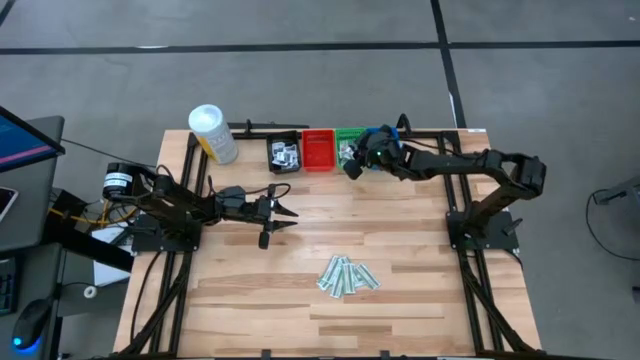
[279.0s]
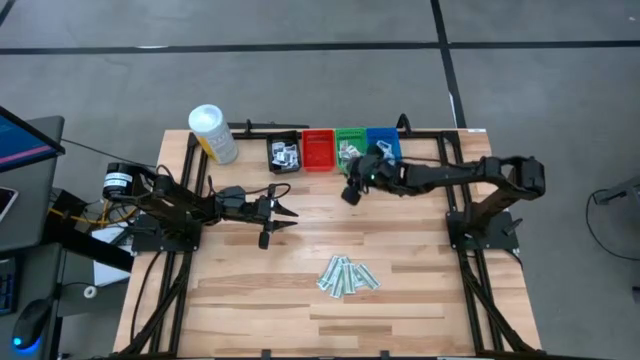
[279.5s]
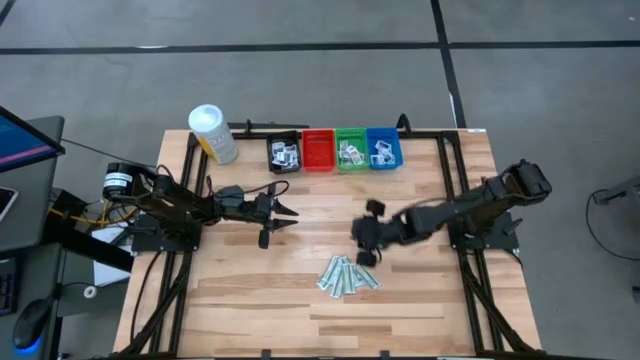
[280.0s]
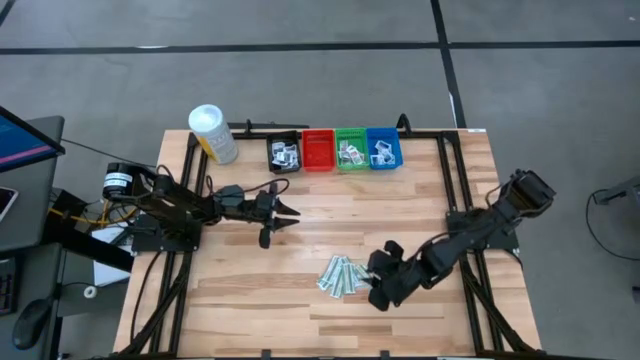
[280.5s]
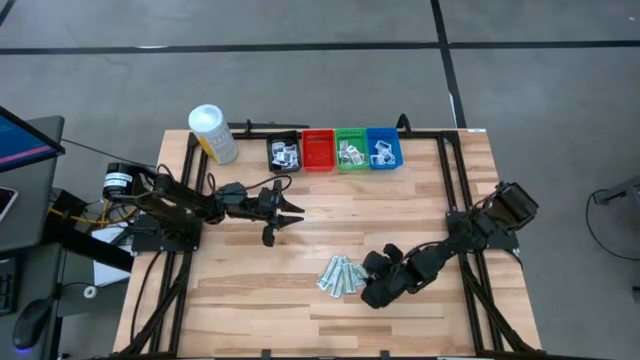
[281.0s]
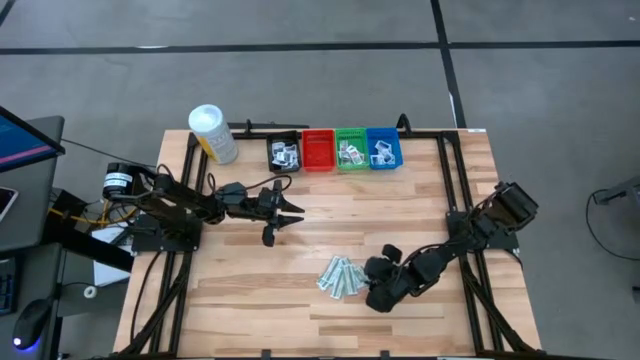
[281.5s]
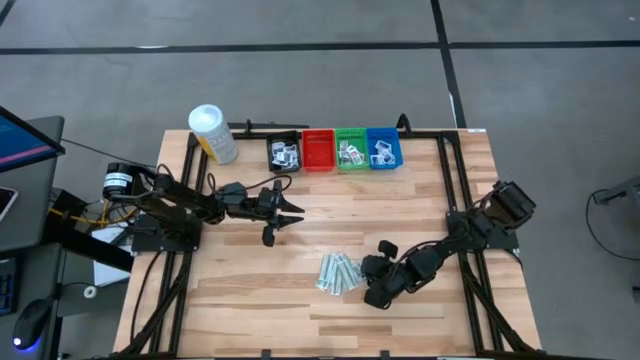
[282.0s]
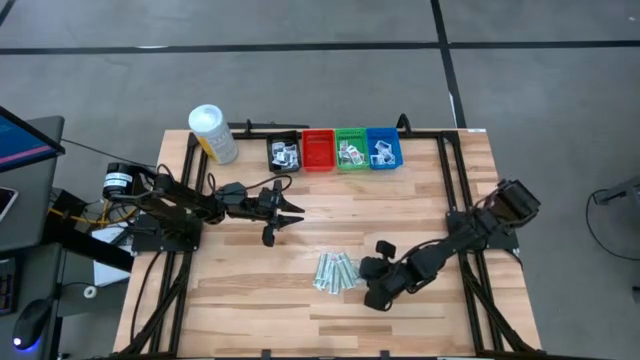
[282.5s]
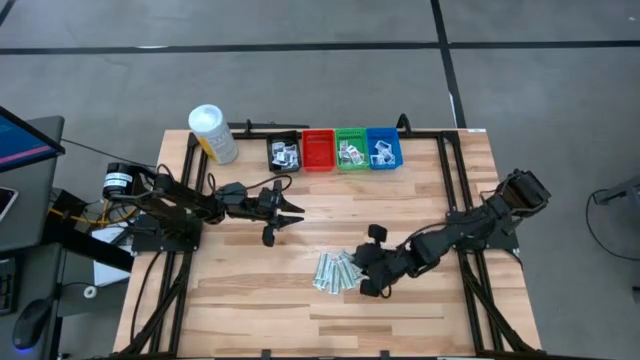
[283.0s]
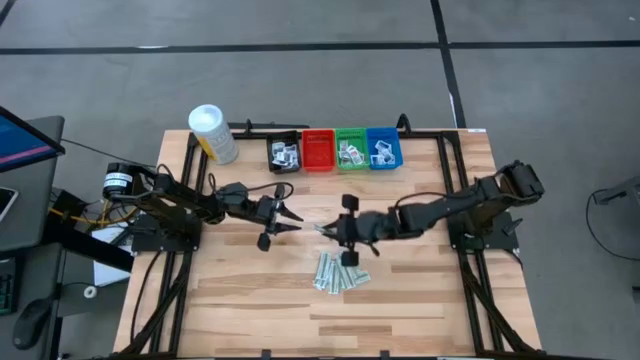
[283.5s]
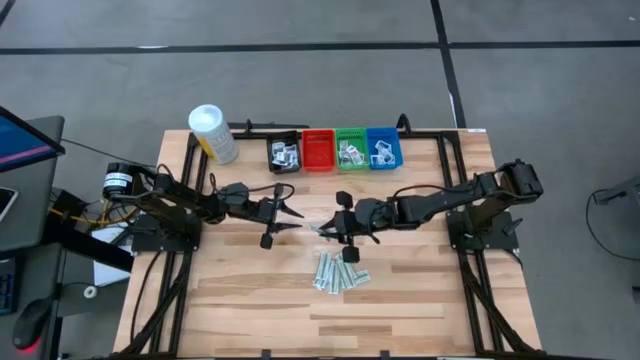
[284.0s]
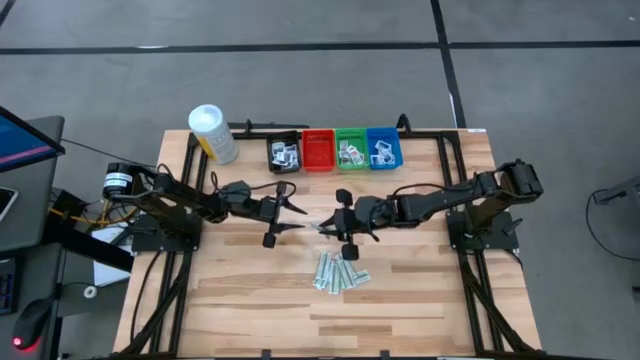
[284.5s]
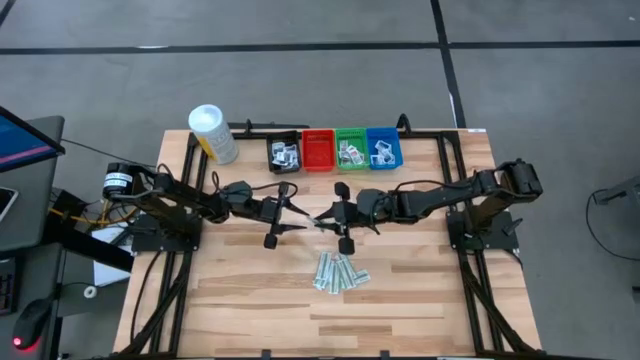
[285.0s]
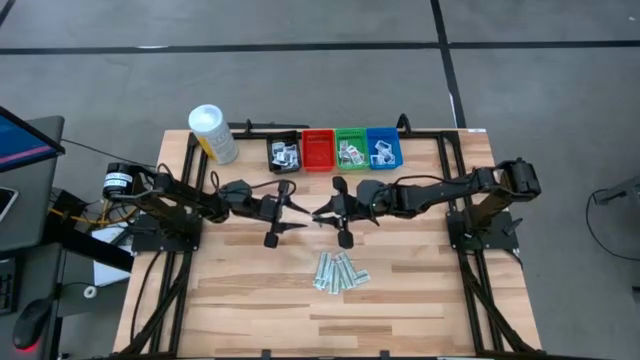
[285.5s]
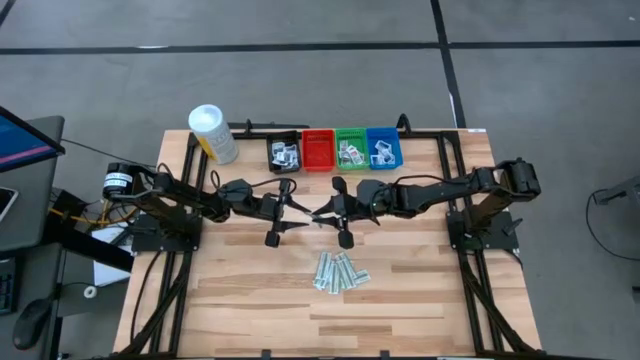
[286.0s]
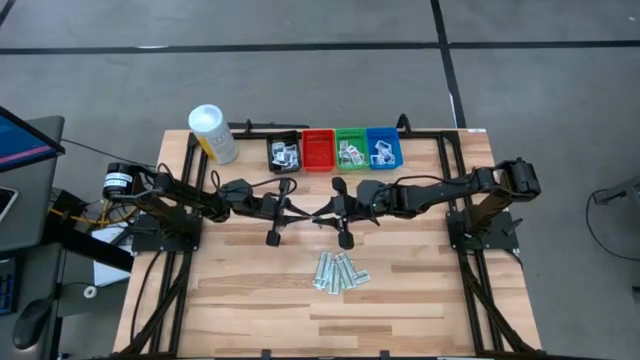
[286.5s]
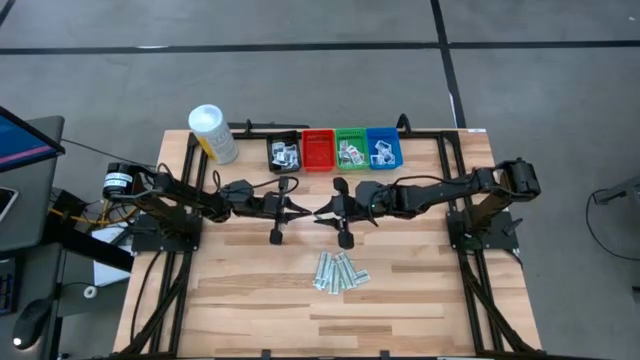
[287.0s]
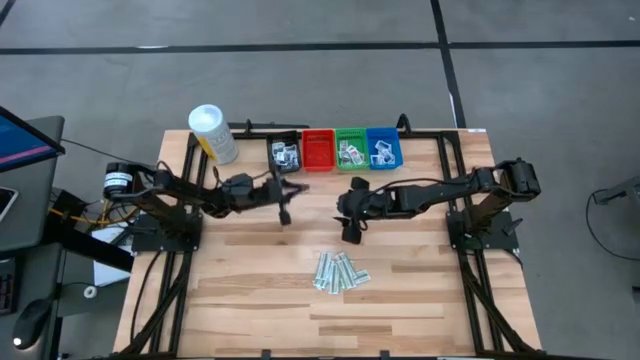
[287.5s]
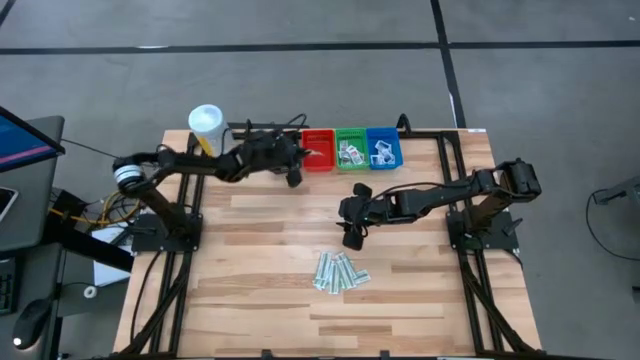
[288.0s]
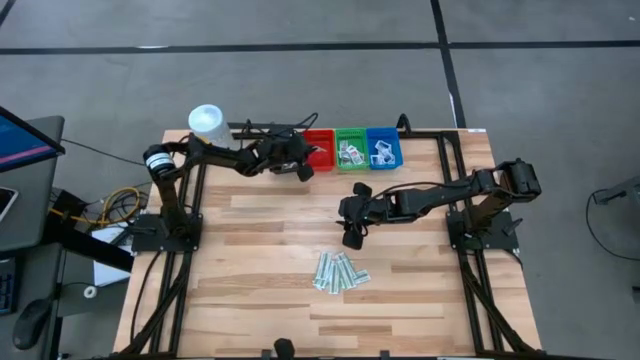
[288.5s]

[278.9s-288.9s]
Task: Pick & Place First Aid Supplies
Put the green bandage pack into the red bin

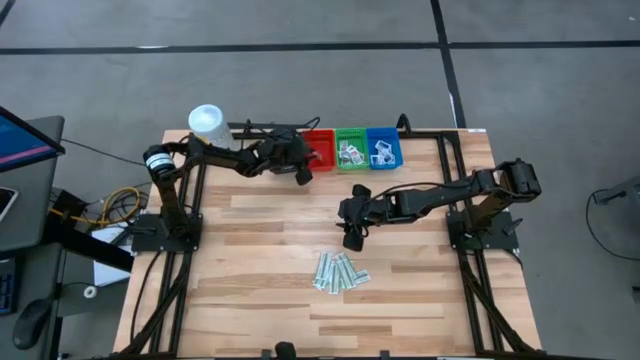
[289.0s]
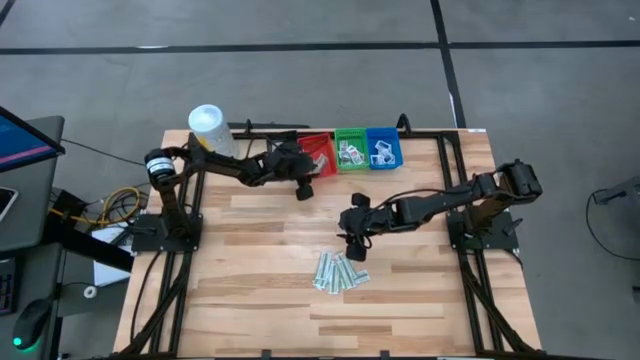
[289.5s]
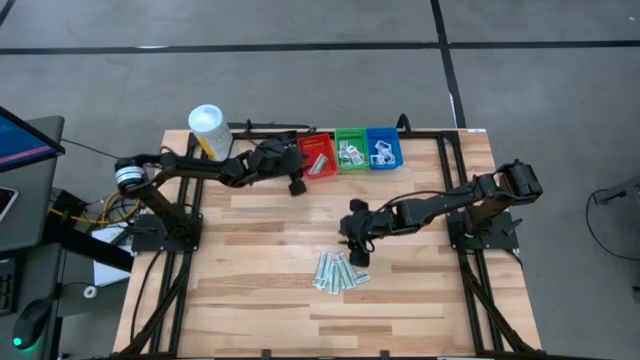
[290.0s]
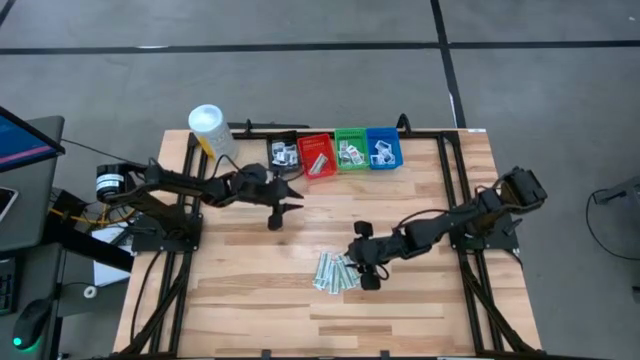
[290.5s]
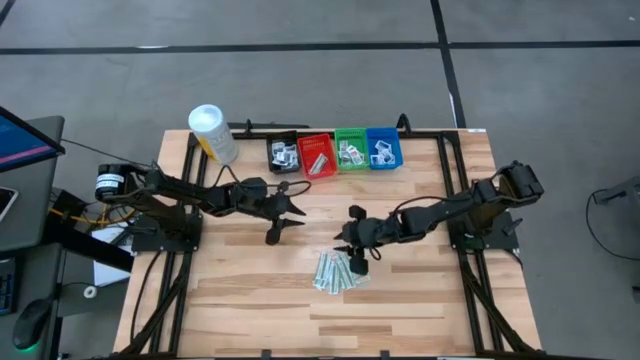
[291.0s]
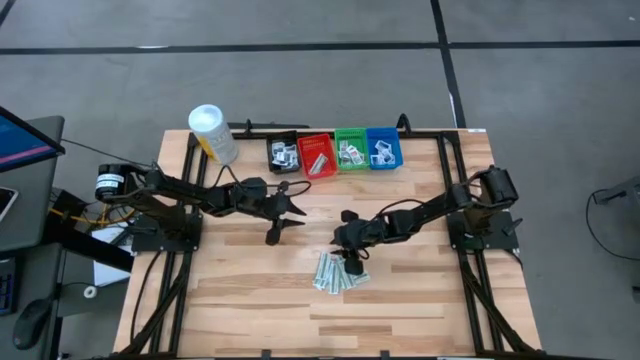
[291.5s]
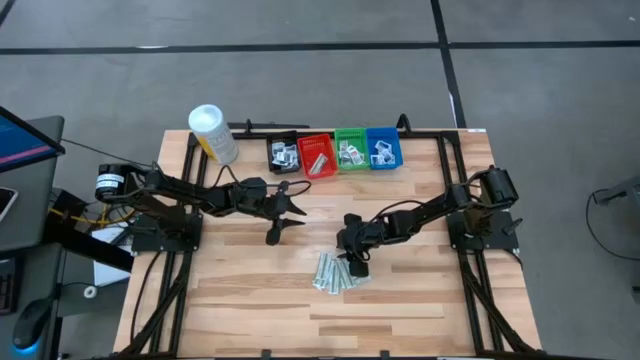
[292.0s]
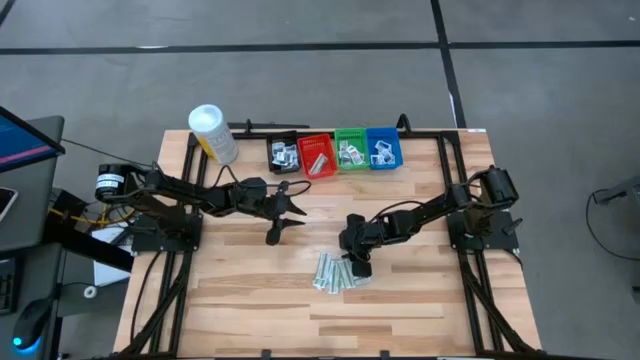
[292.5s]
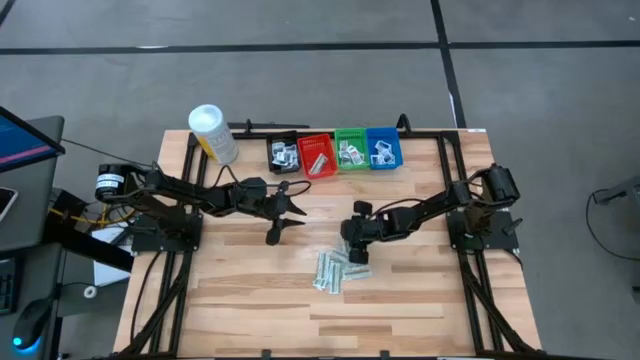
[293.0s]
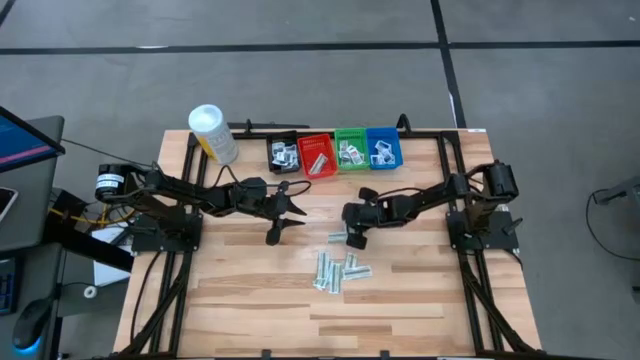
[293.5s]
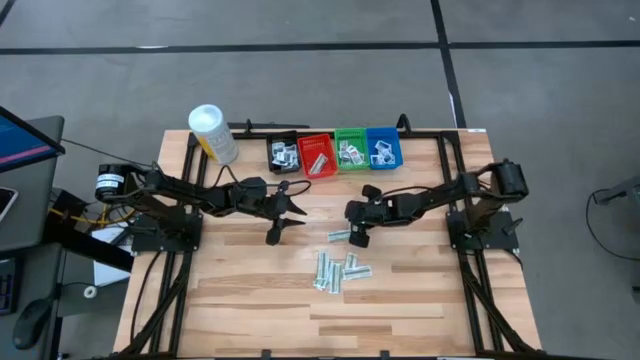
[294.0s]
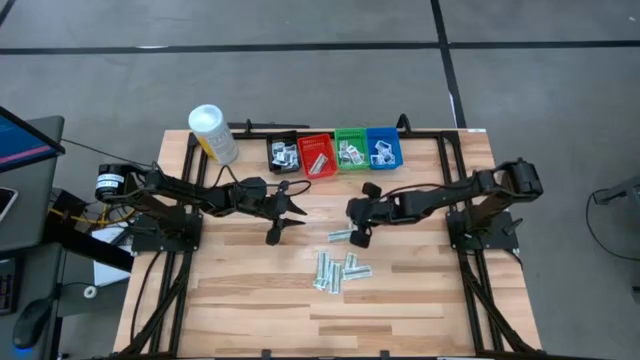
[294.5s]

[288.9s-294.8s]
Put the green bandage pack into the red bin

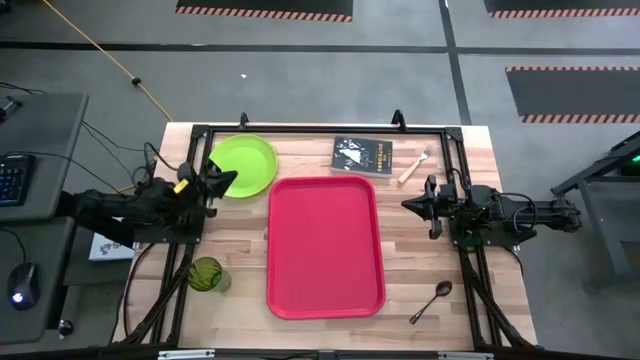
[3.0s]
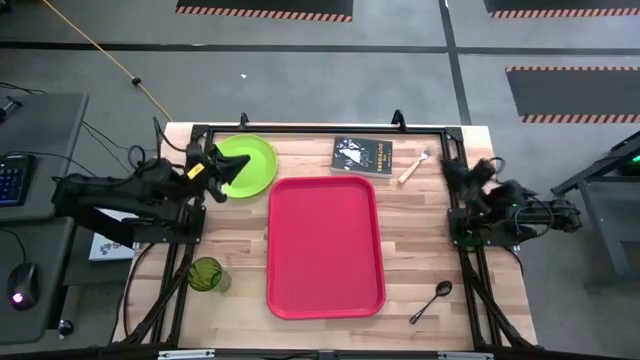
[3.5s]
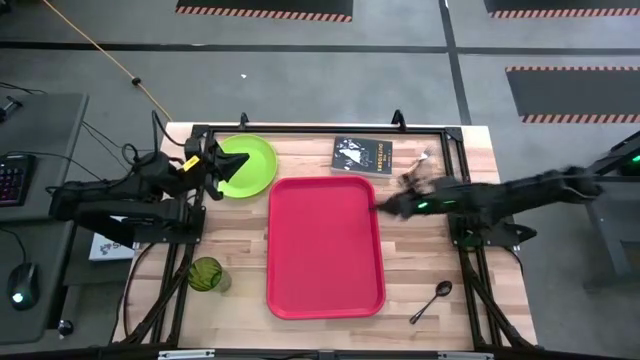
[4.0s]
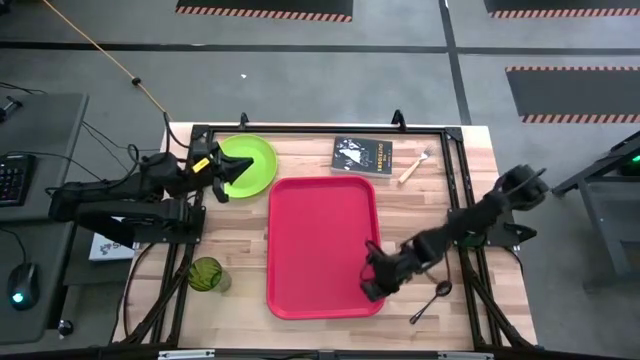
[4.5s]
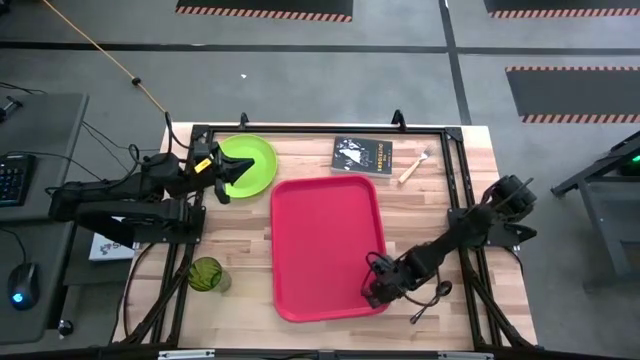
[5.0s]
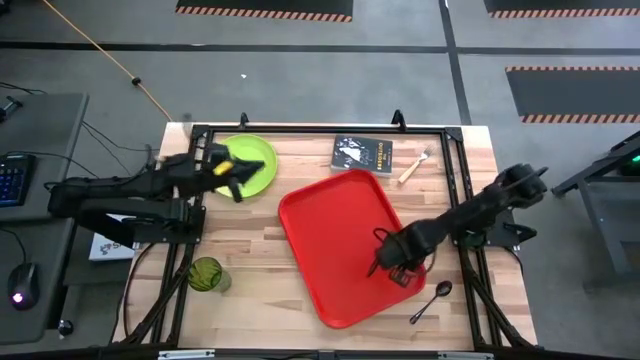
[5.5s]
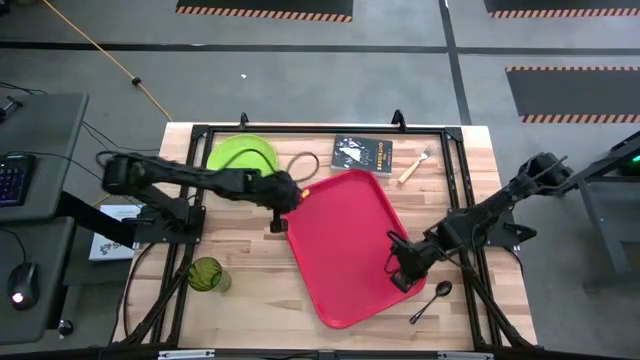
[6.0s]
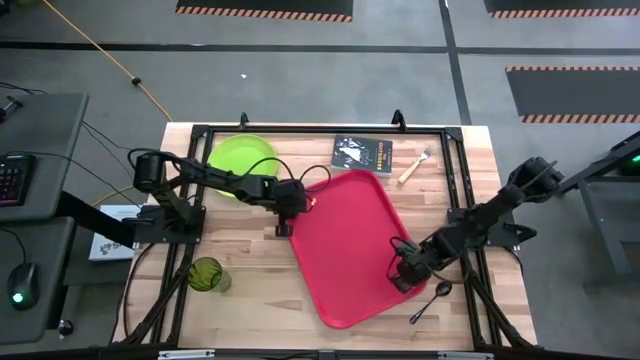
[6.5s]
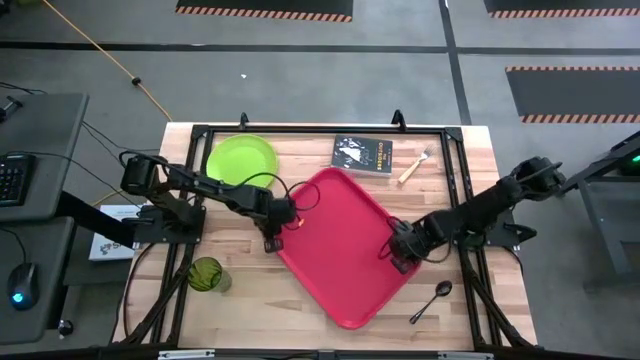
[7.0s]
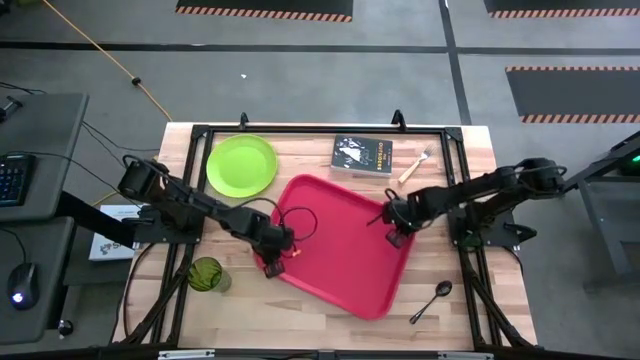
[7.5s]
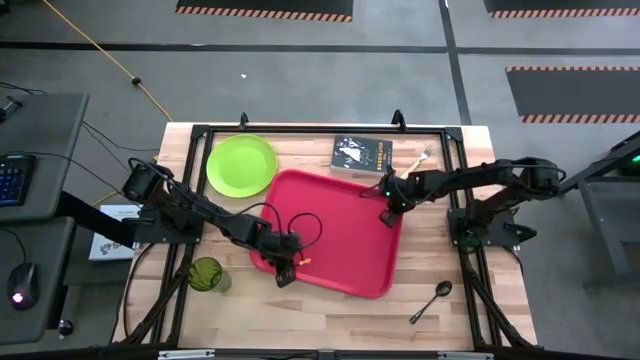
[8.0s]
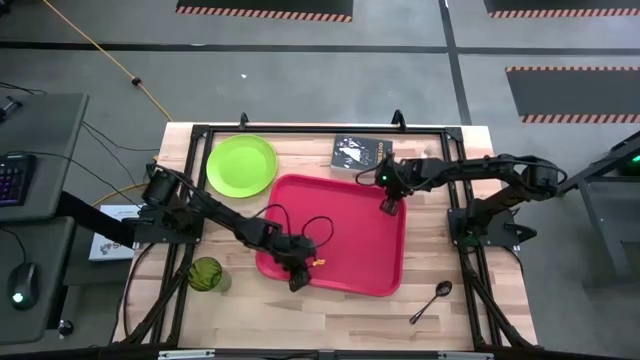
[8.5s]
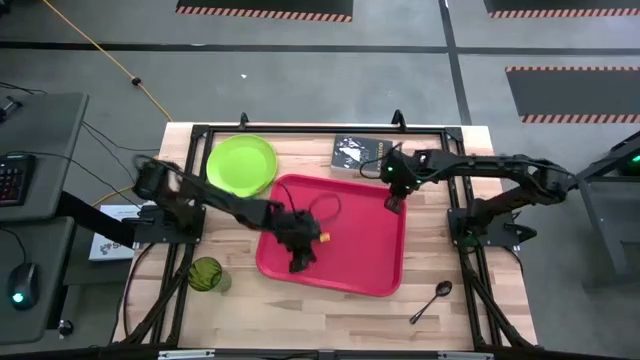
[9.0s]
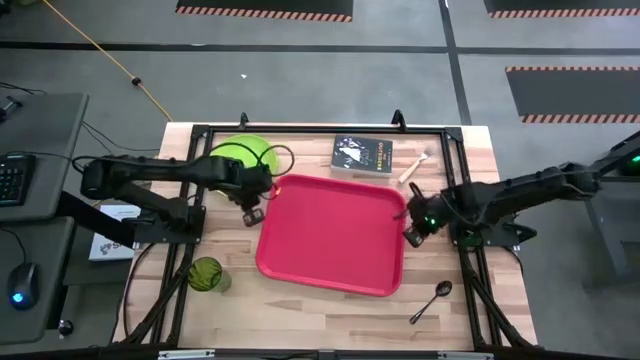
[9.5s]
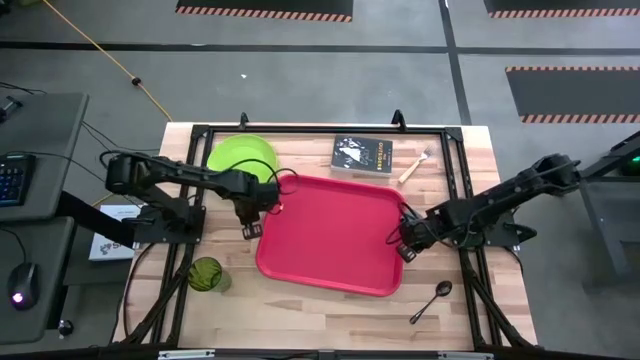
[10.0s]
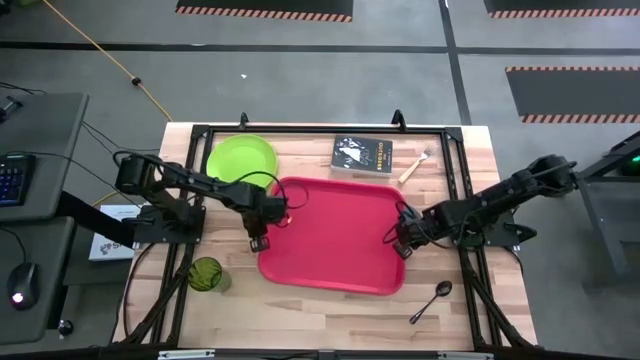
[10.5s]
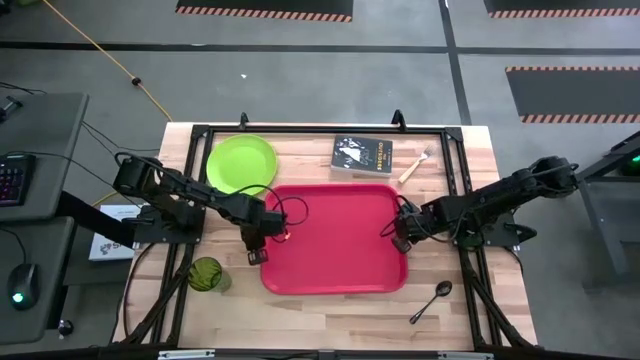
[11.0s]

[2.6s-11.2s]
Task: Pick and place plate/cup/fork/spoon on tray
Adjust the red serving tray
